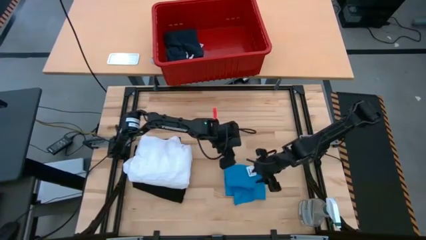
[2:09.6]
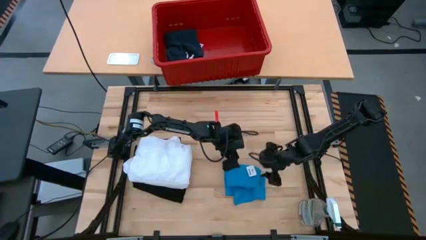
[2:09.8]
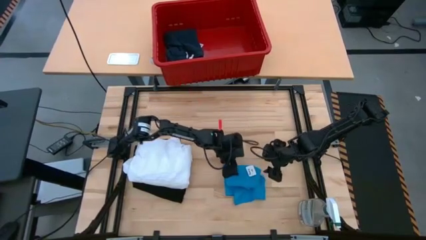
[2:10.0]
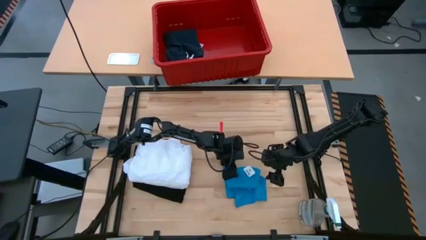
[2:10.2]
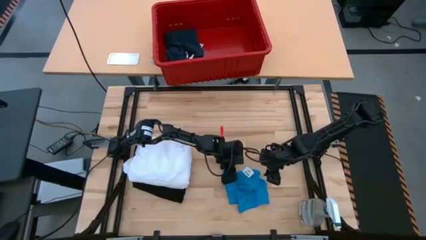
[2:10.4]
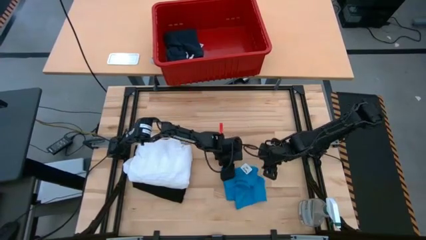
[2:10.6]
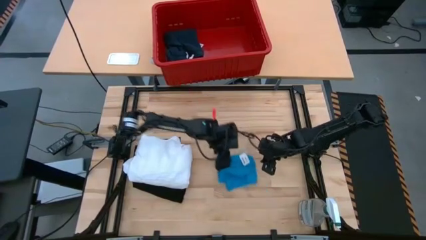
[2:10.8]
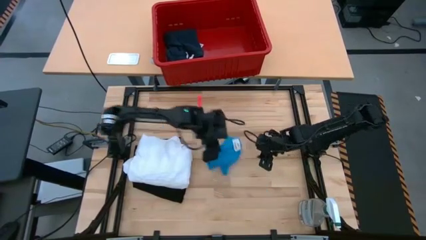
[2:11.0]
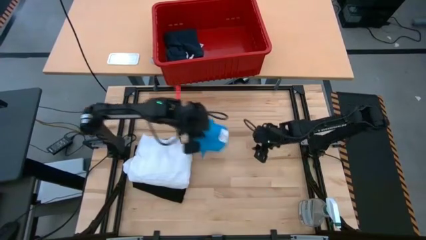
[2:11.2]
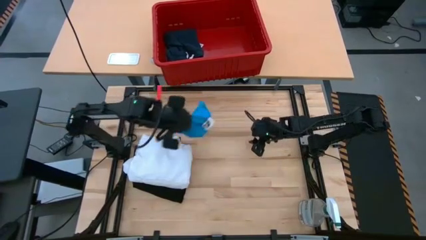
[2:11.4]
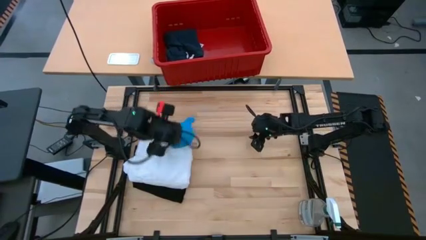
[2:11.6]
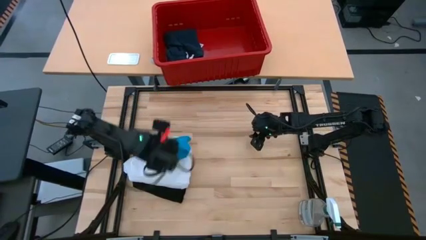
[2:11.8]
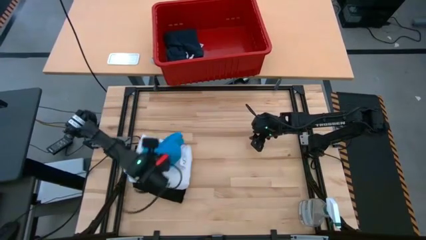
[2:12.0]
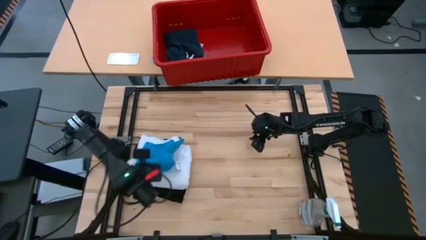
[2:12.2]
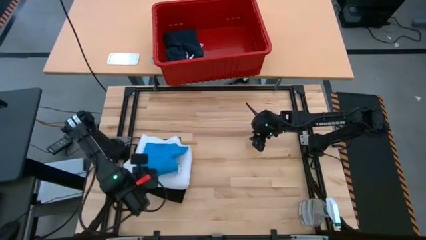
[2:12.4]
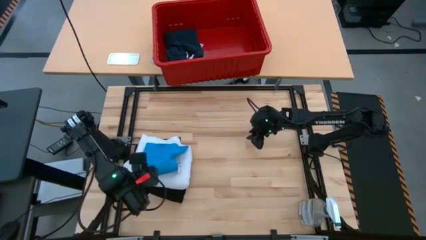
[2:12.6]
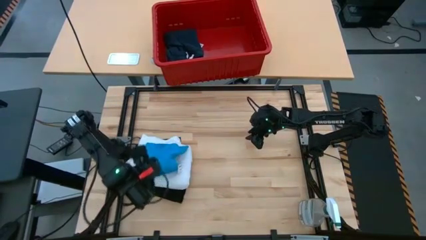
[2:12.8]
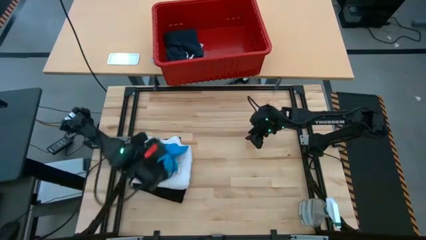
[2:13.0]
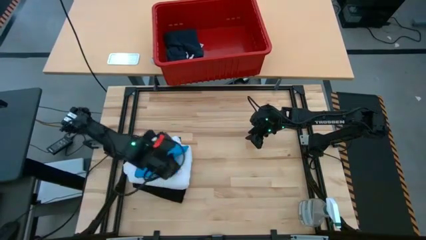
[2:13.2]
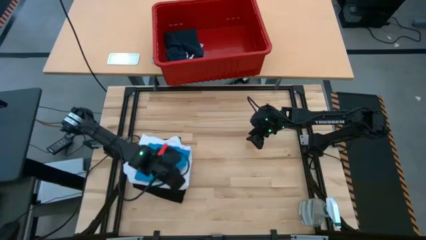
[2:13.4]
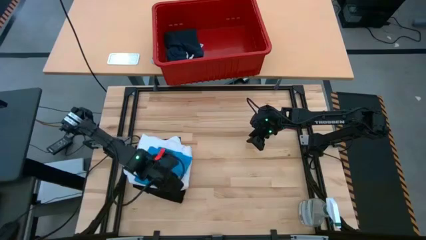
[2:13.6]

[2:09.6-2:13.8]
Task: Fold laundry
Put the folded blue short on the white shirt

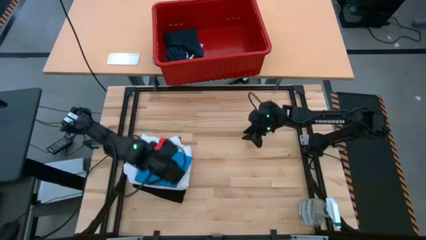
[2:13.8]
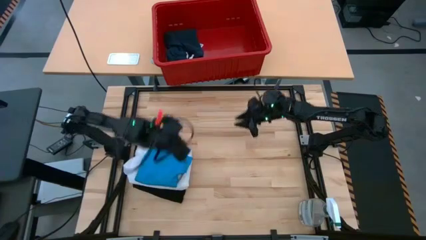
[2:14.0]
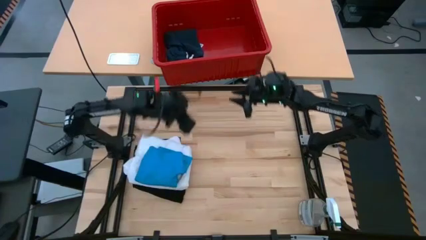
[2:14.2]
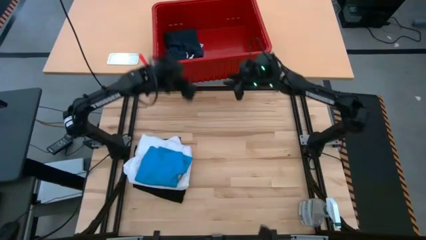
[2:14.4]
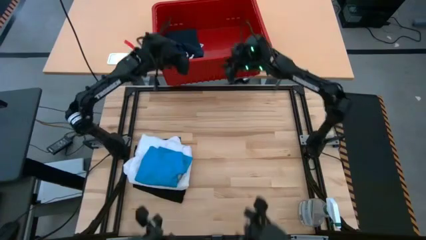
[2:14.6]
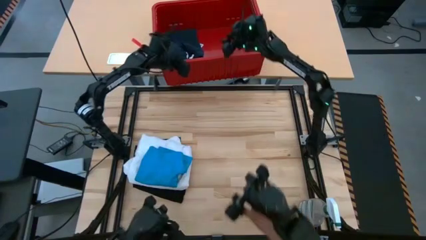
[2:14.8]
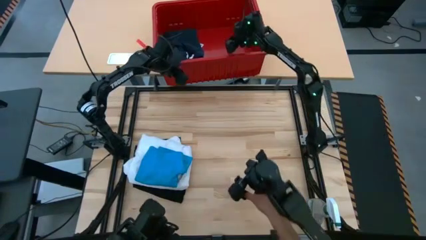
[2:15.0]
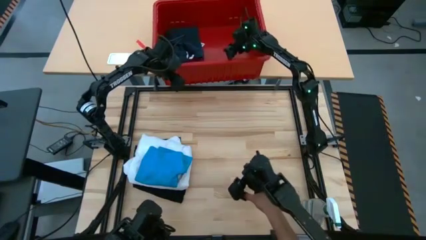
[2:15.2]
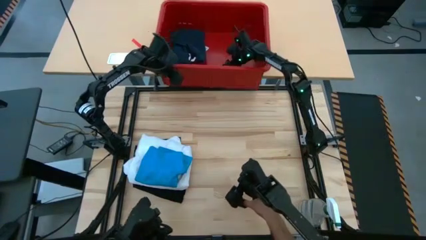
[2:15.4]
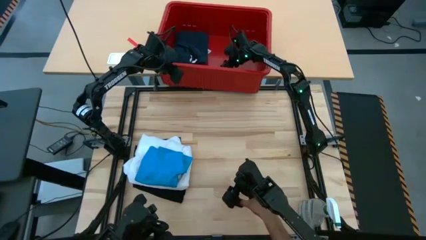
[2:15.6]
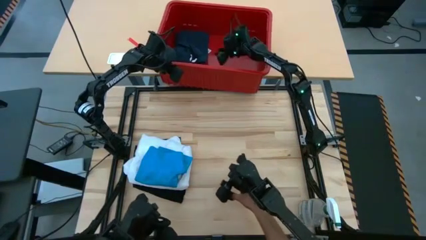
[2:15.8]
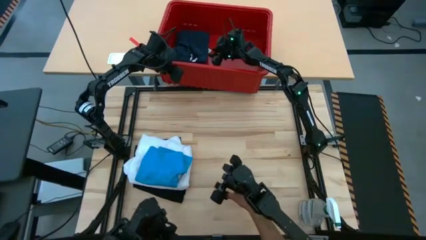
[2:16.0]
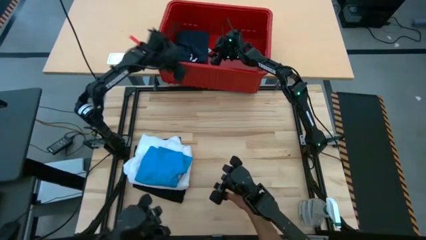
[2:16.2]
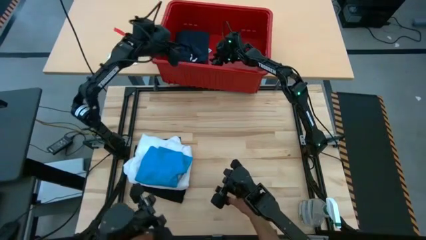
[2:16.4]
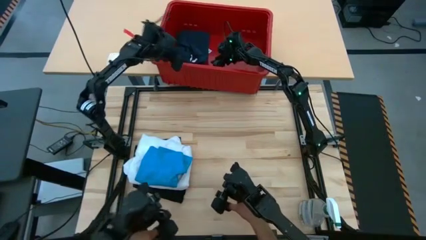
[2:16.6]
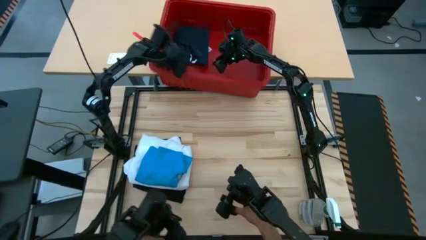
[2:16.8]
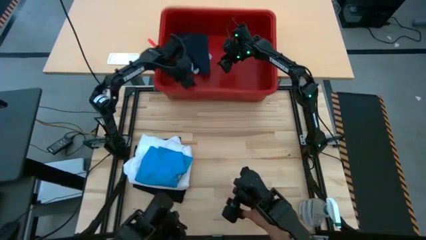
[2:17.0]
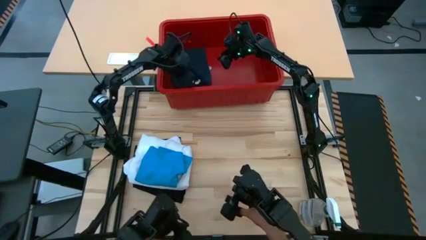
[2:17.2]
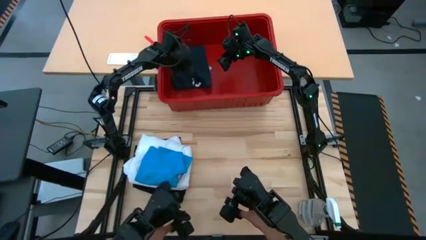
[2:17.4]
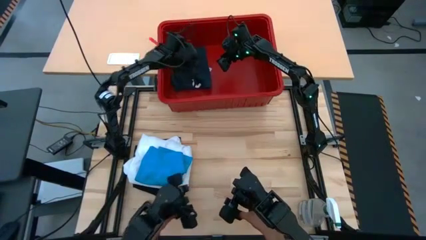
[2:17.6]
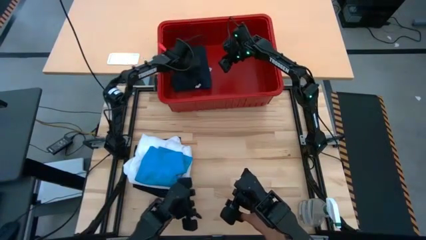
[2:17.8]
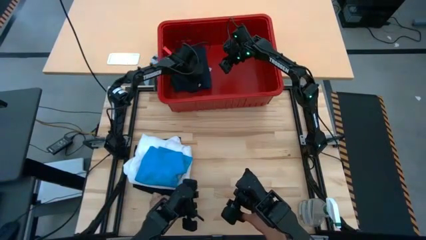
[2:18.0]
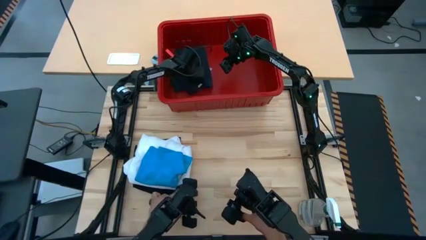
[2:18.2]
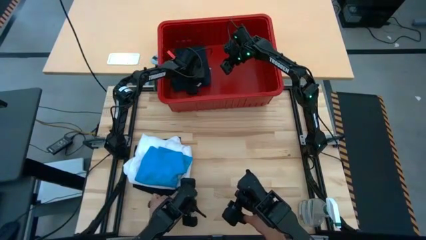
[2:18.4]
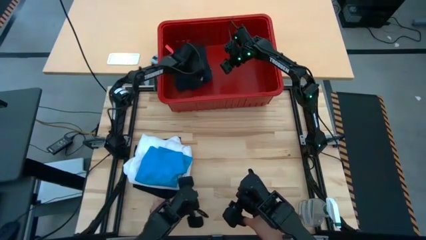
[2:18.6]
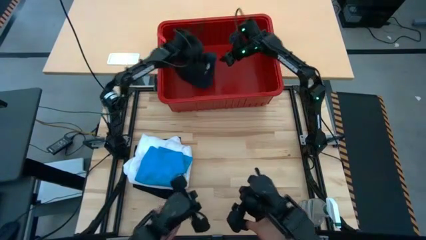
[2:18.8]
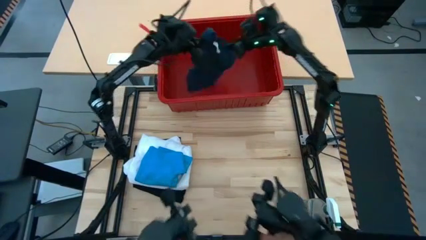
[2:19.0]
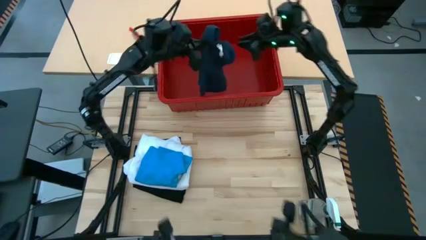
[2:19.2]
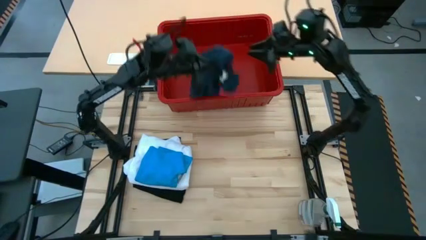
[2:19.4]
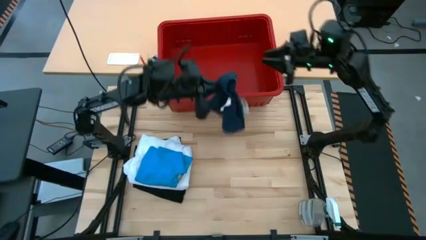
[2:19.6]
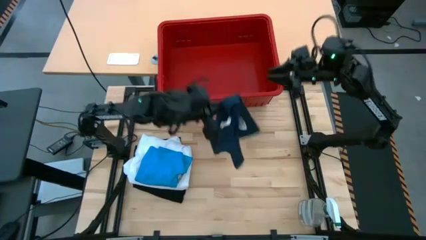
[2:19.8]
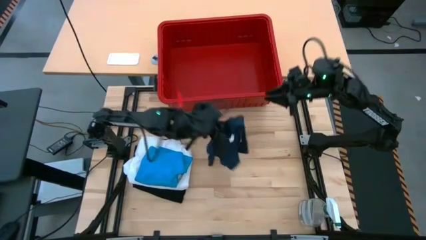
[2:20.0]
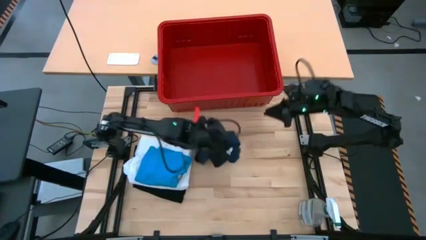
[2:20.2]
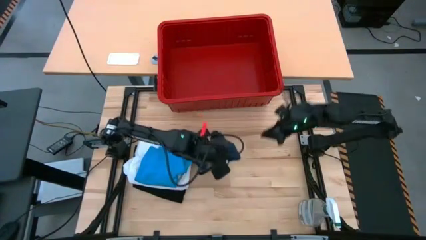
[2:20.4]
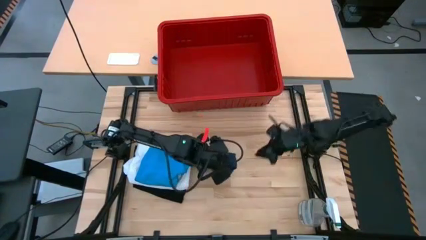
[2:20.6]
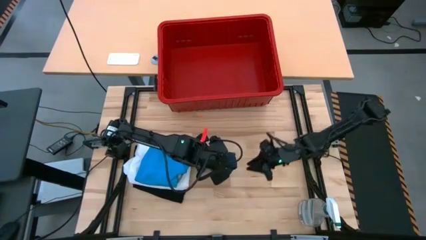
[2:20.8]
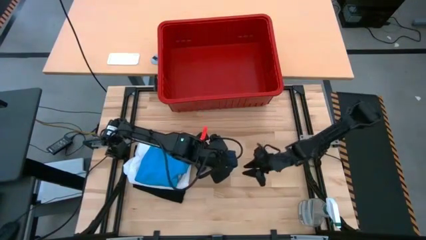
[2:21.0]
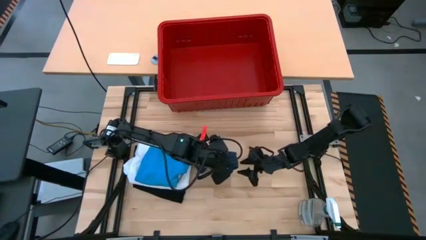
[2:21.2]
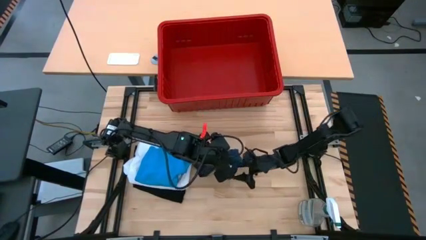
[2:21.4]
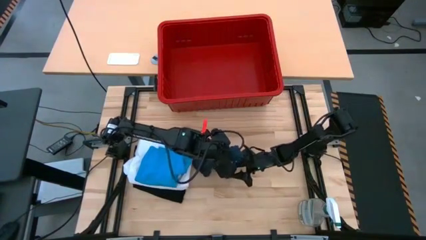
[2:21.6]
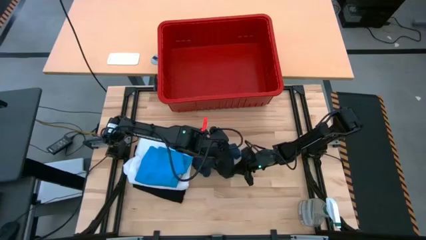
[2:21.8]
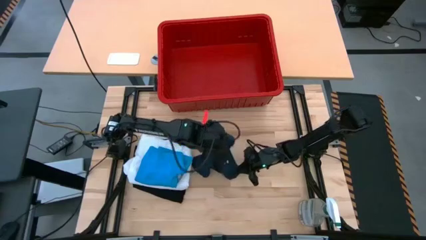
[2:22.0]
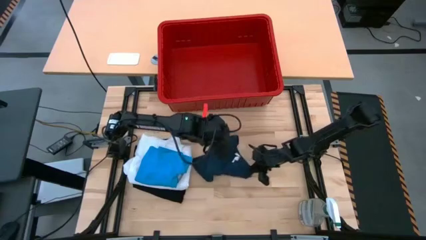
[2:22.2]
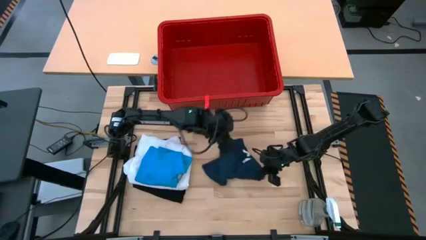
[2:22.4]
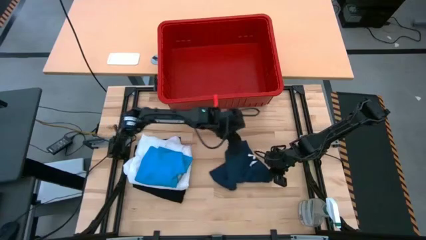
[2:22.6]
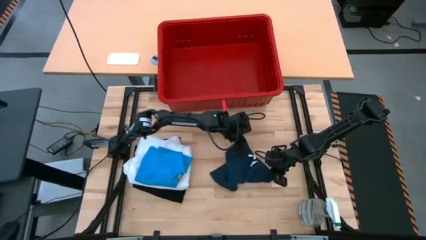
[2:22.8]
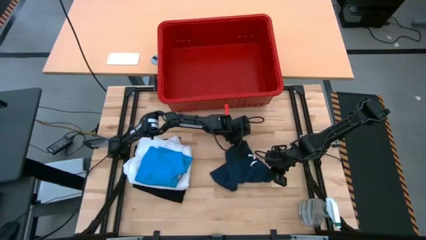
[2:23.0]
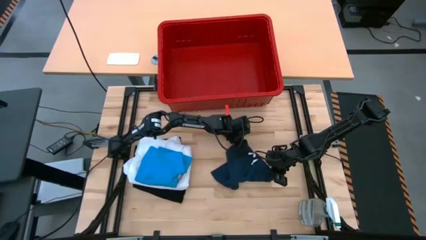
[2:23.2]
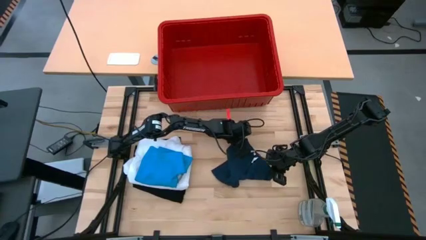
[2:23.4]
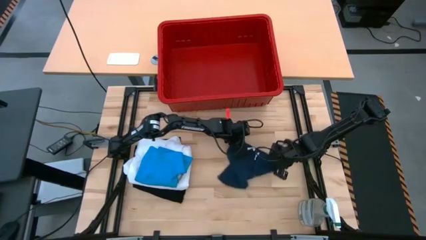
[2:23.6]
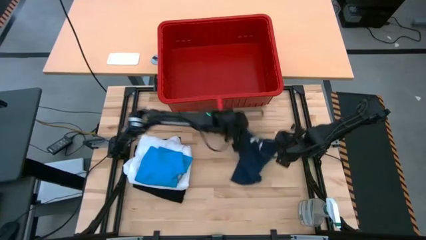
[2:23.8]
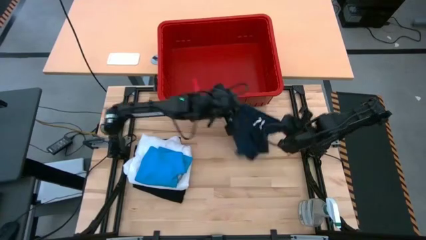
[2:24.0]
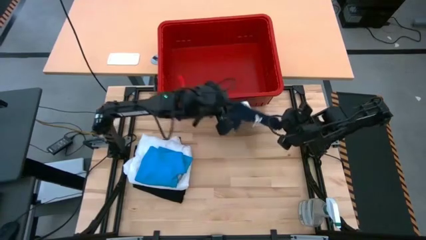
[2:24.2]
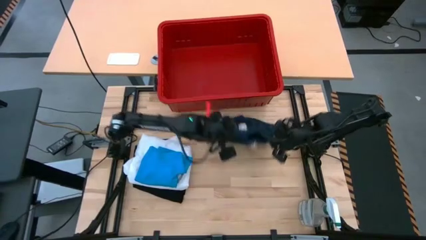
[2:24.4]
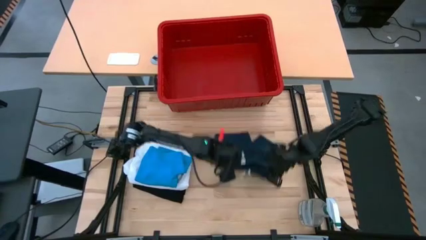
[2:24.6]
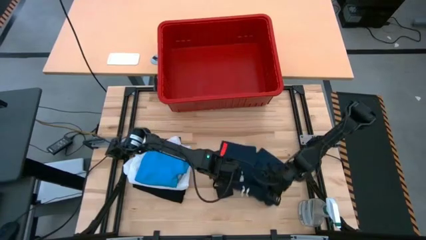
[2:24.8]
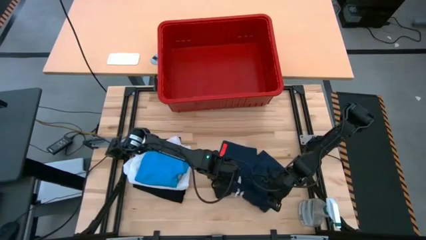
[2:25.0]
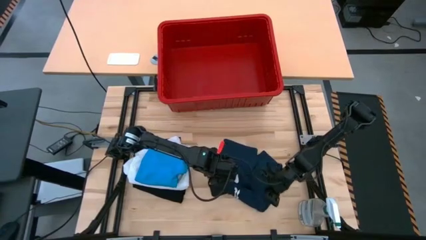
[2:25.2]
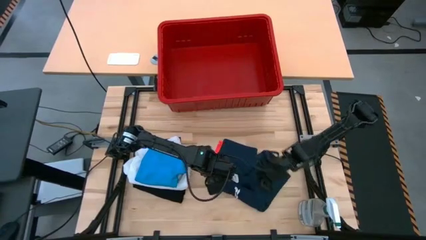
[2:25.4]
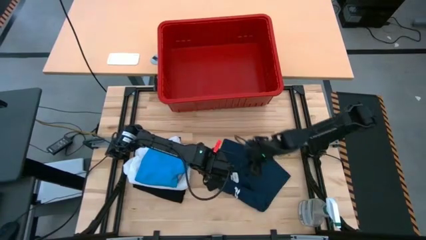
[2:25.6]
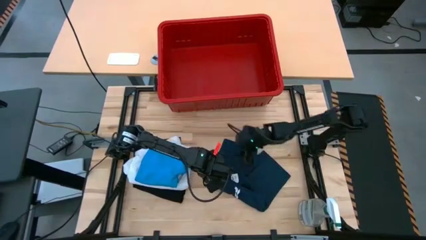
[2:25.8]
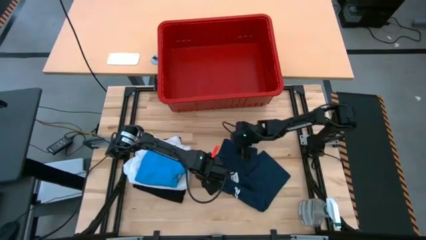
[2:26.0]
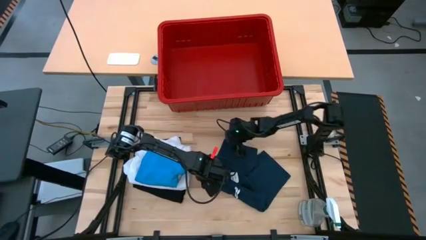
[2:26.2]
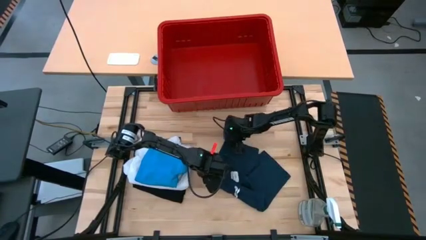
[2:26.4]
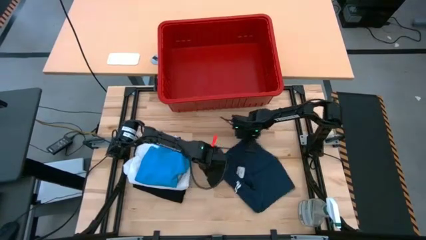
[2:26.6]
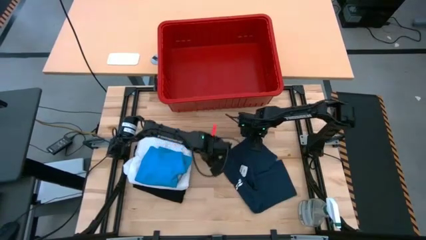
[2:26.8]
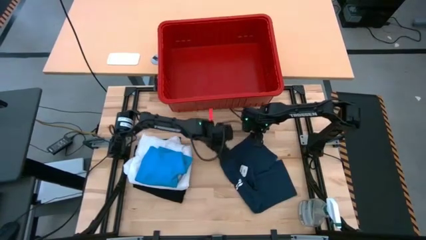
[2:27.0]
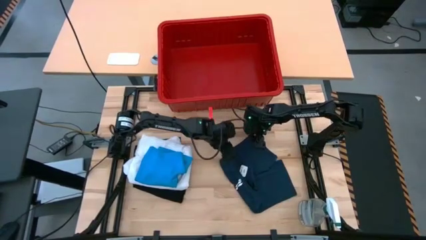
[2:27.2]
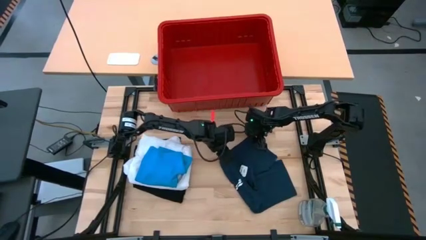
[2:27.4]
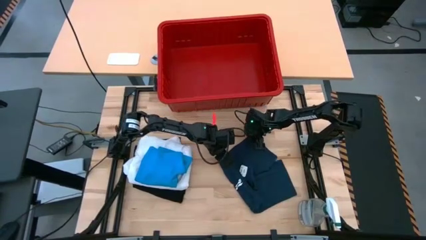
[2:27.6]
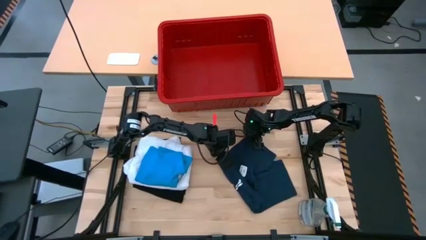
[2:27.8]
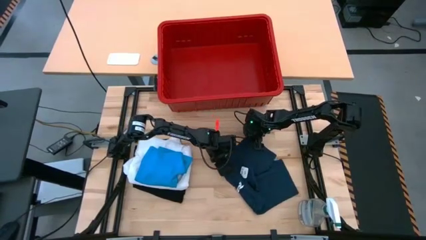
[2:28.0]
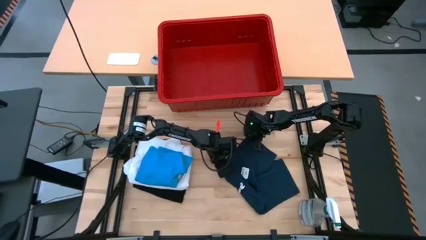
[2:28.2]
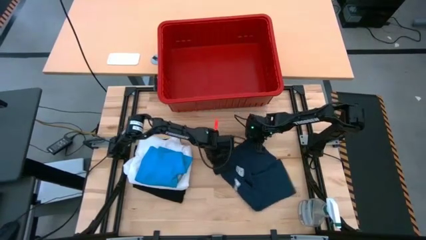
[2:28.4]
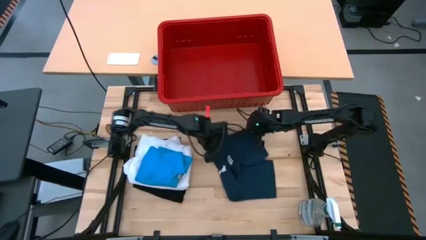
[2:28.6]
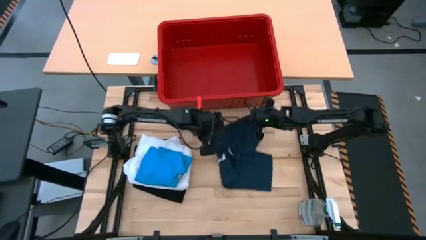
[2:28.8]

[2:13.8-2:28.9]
Fold the dark blue short
